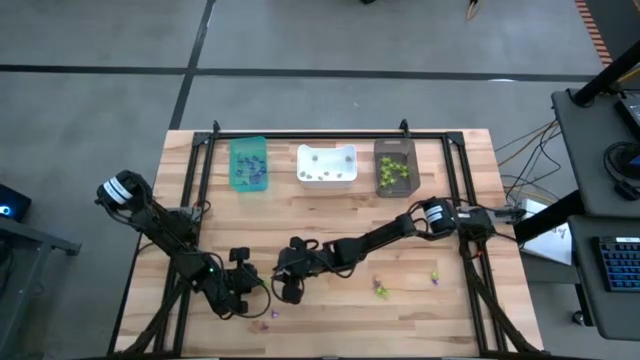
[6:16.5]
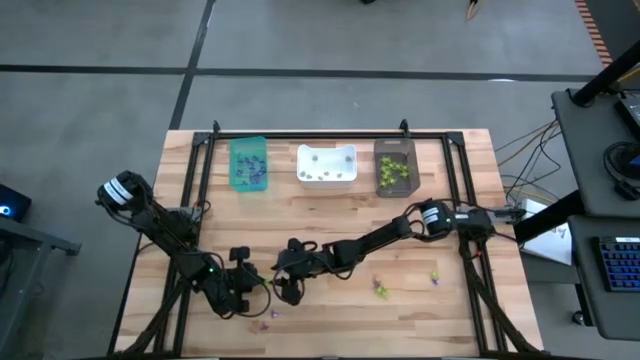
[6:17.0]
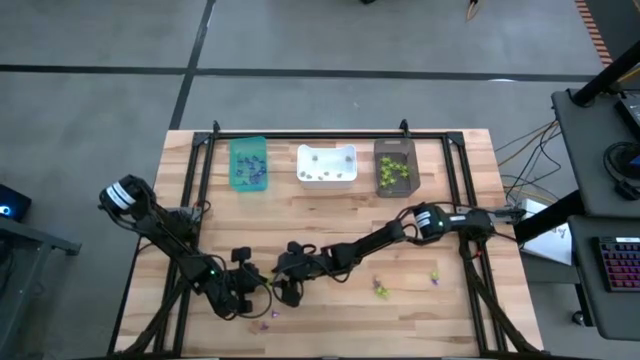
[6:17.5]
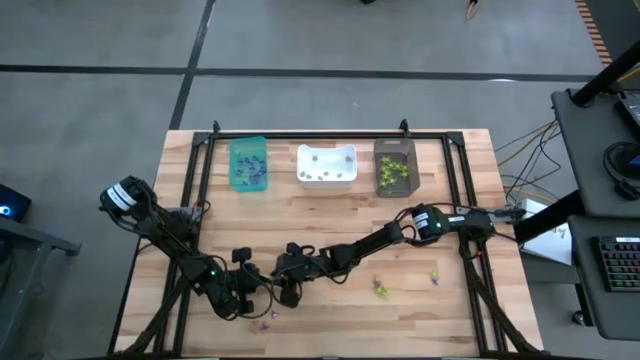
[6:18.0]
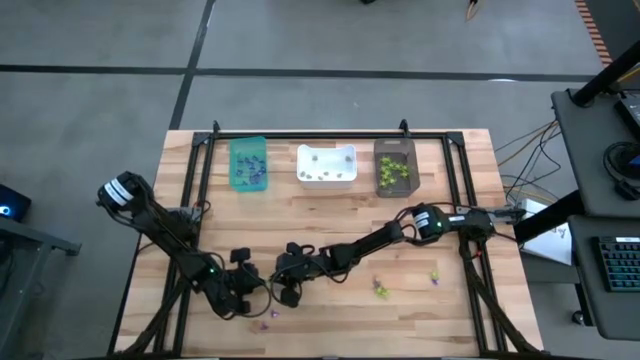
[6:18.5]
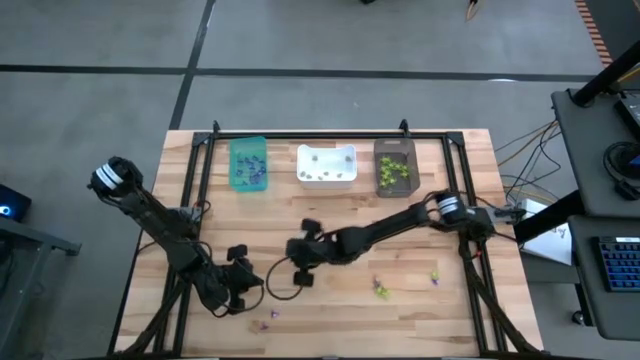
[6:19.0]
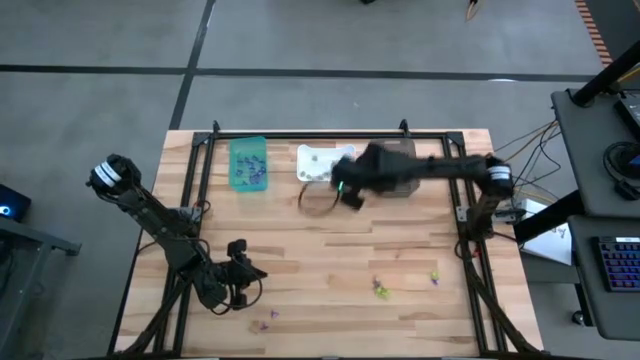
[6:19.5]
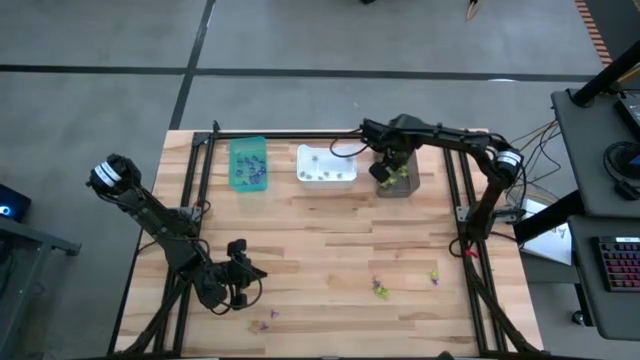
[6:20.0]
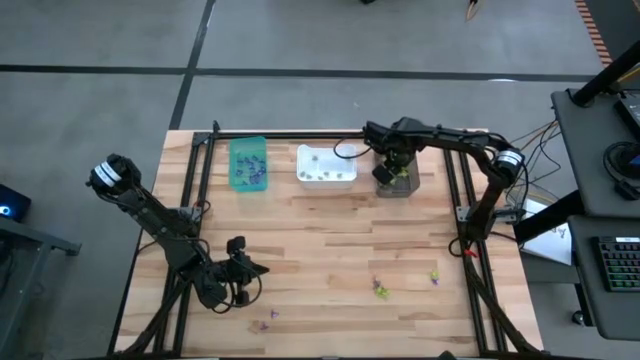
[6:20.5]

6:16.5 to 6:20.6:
Task: Sort Halloween decoration
Put the green spider toy into the black bin

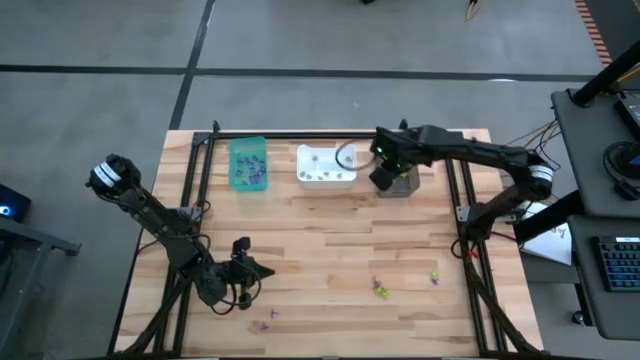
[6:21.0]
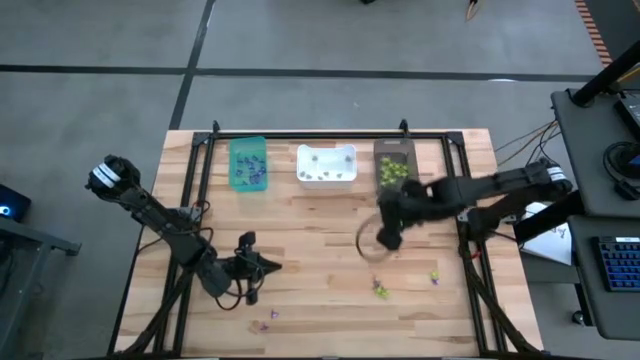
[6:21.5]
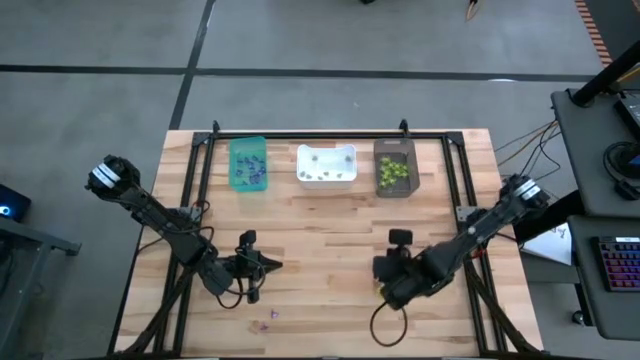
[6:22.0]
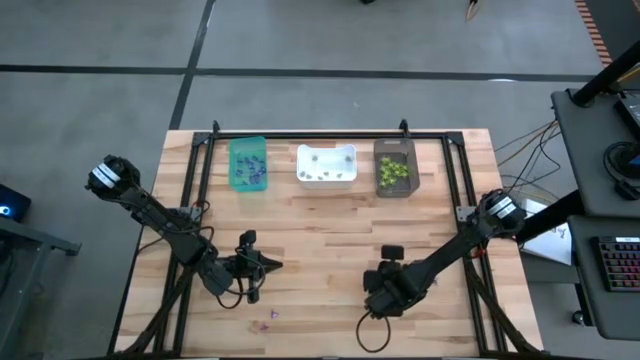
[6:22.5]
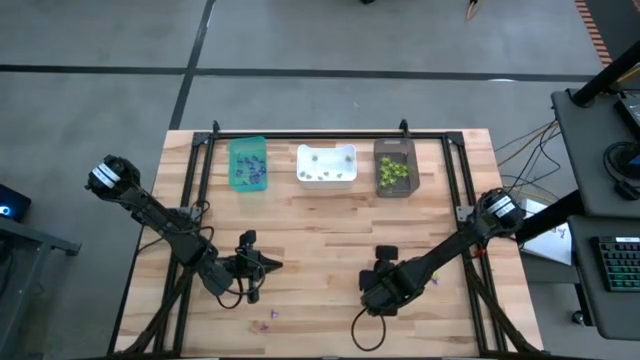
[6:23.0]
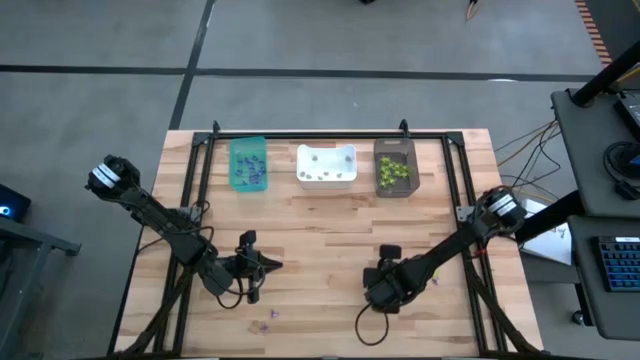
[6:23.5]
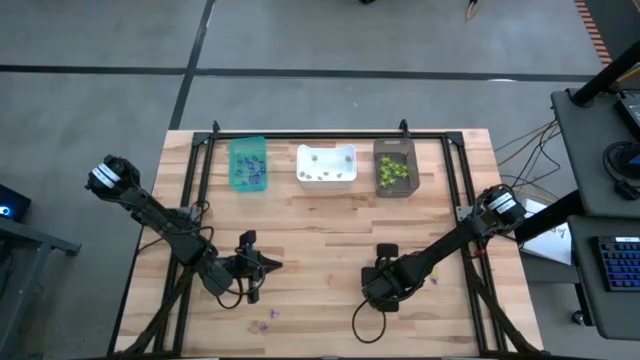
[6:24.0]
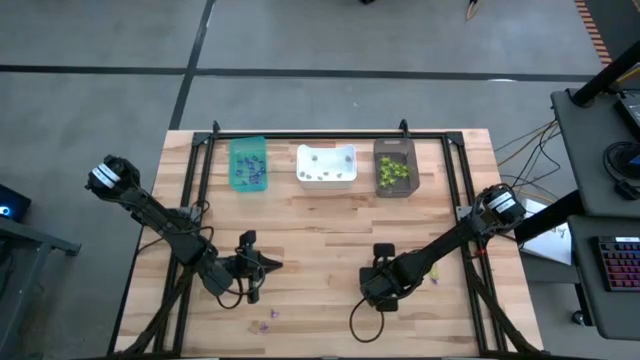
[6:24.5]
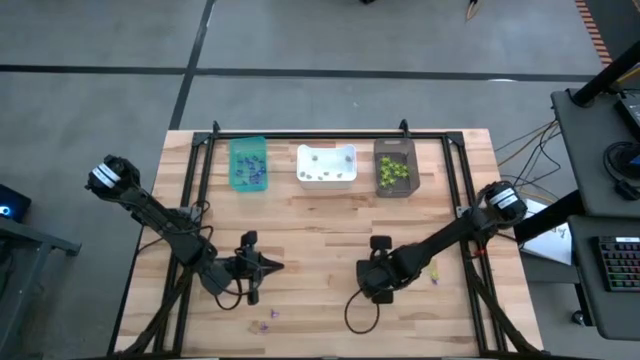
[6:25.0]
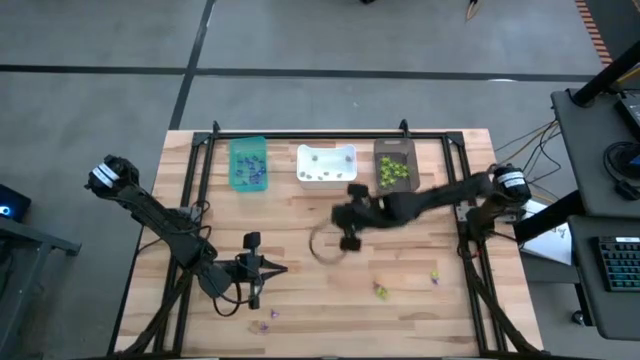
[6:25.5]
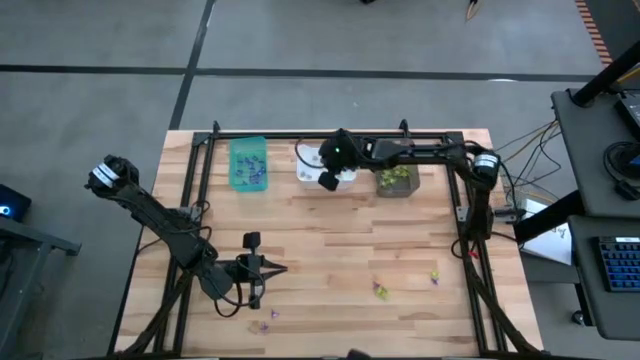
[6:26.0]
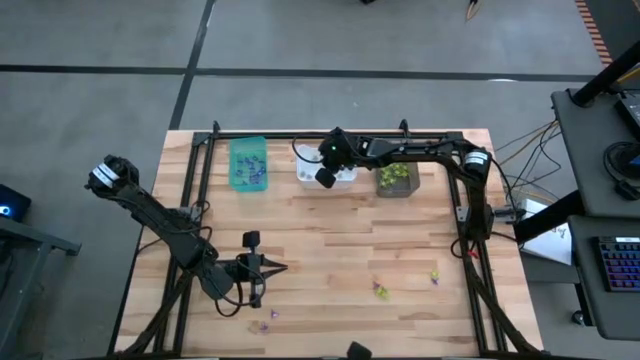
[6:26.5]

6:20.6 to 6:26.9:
Put the white skull toy into the white bin

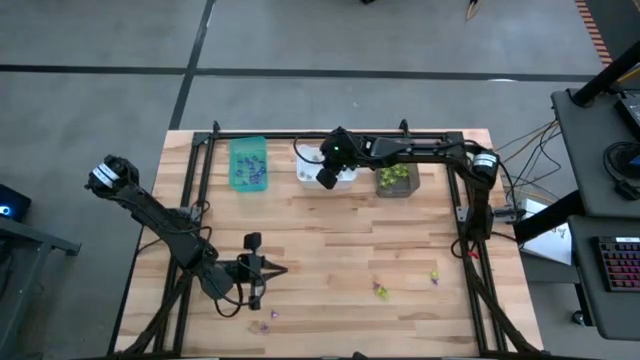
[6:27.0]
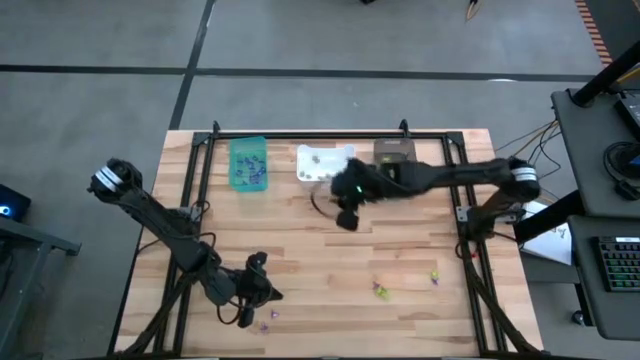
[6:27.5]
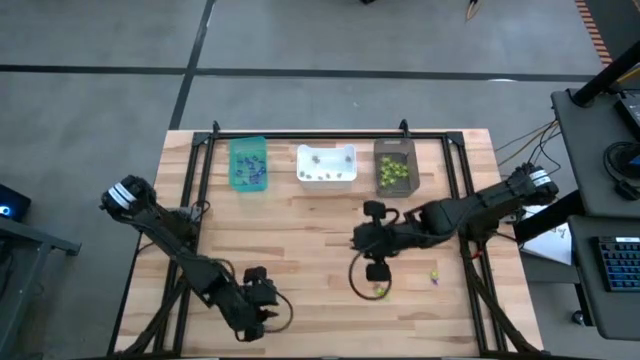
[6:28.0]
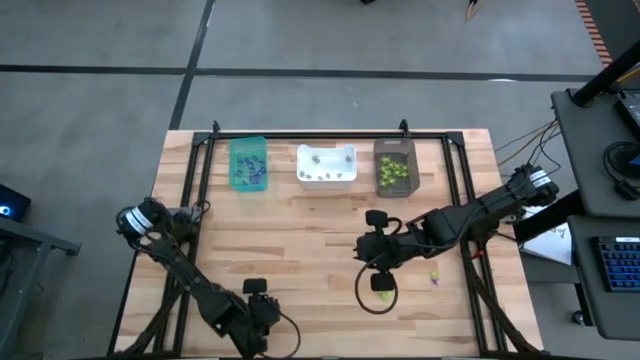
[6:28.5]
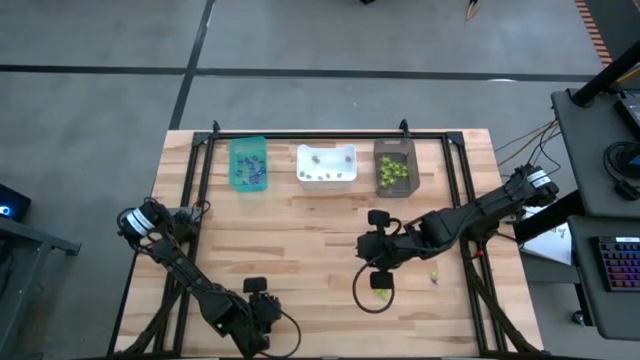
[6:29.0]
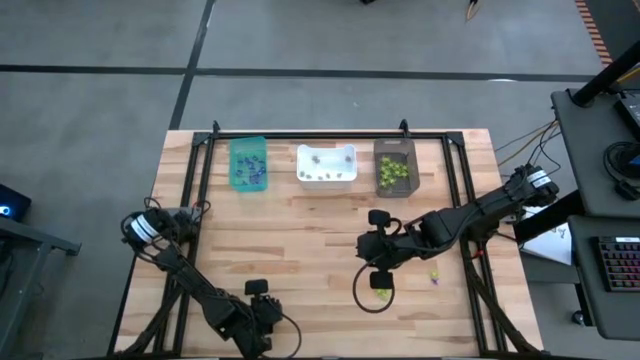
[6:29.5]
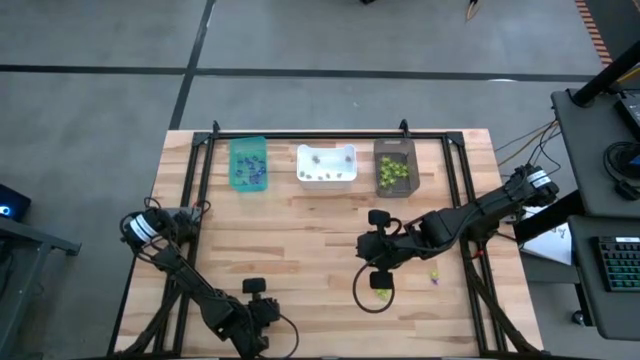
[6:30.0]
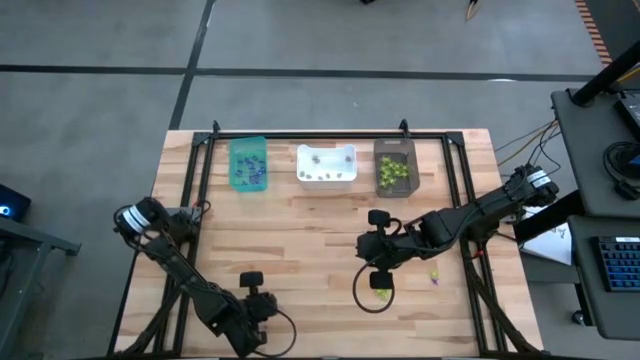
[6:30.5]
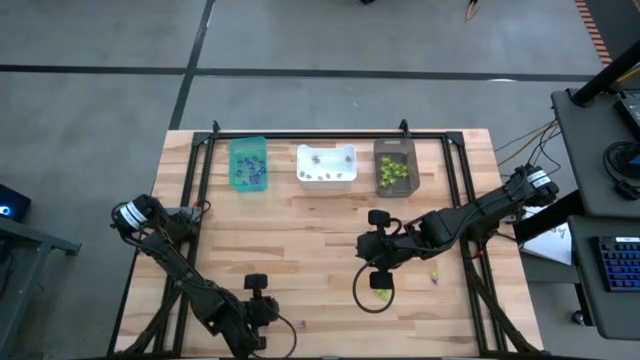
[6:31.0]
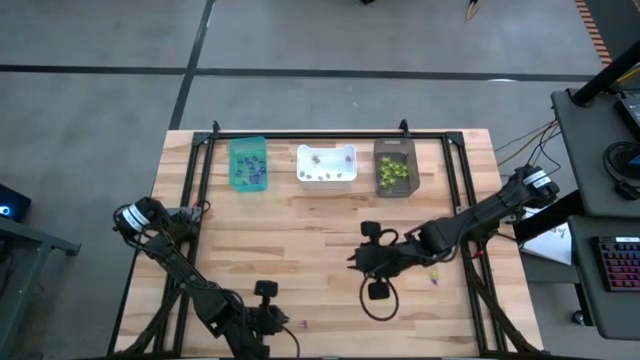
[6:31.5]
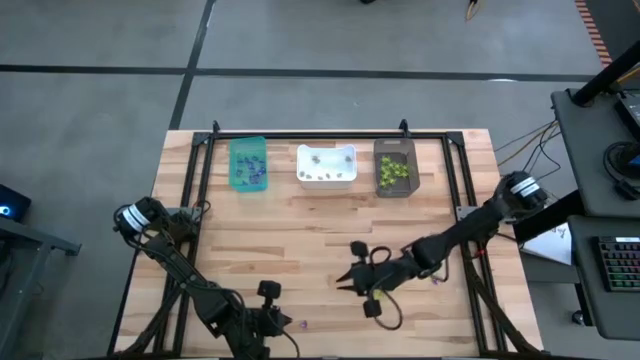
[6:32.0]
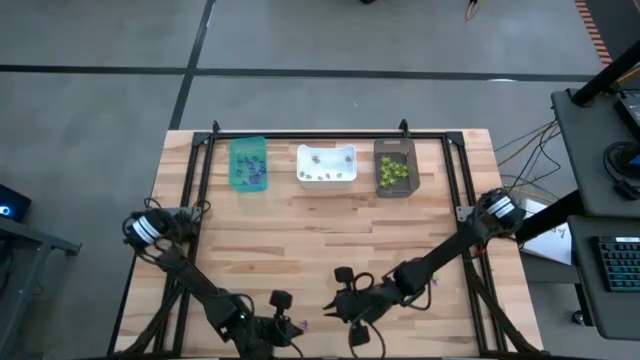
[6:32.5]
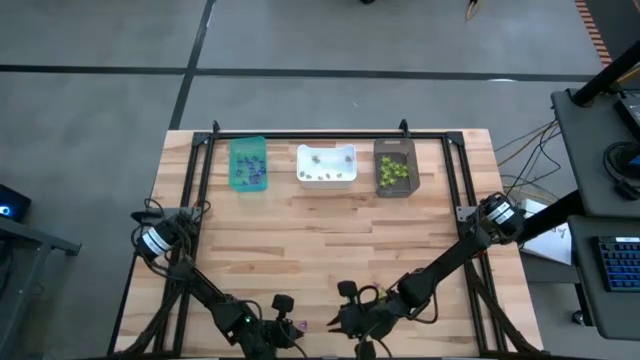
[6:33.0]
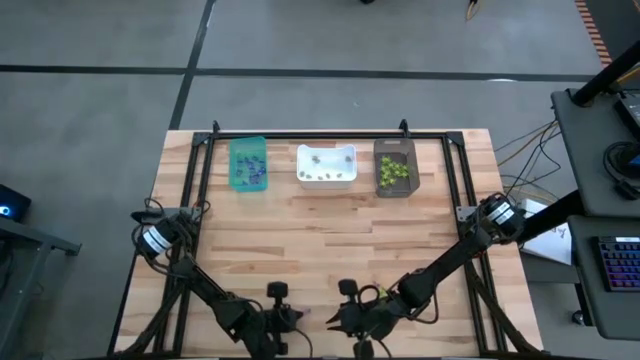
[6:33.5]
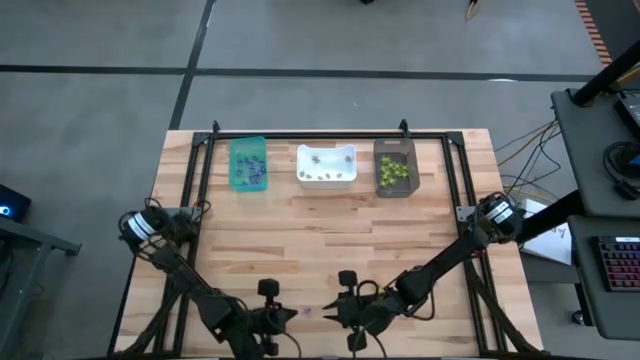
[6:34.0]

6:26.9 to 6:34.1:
Put the purple witch hat toy into the light blue bin

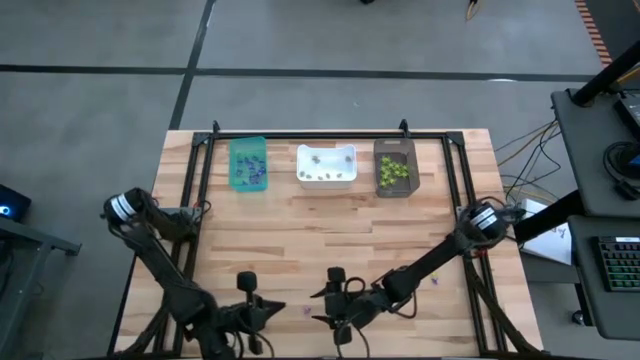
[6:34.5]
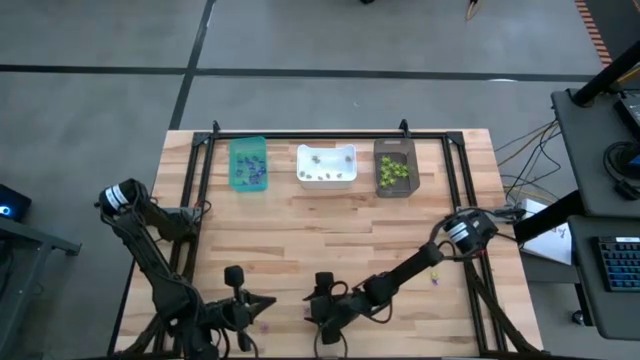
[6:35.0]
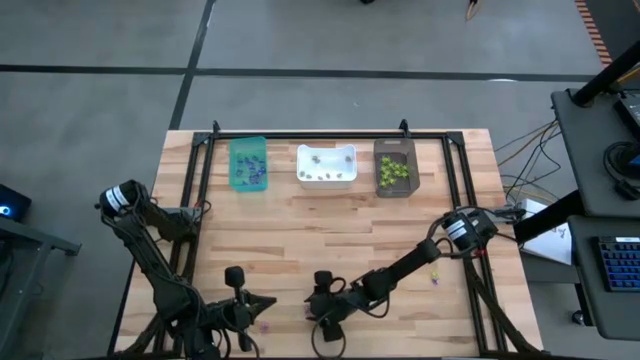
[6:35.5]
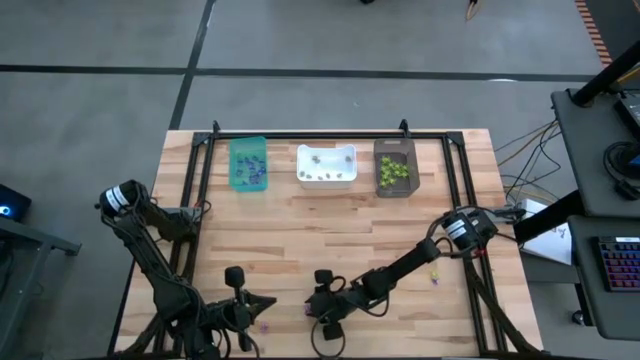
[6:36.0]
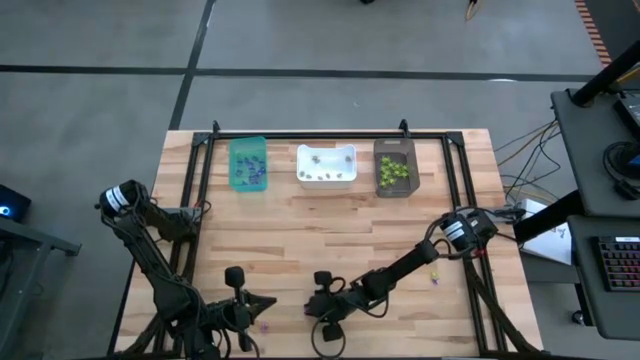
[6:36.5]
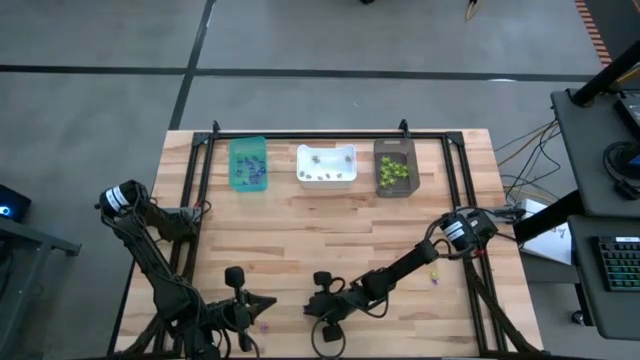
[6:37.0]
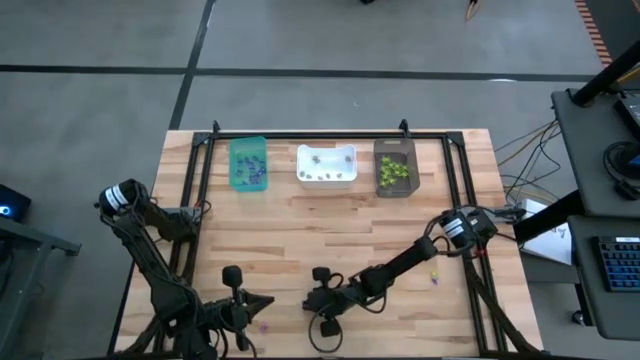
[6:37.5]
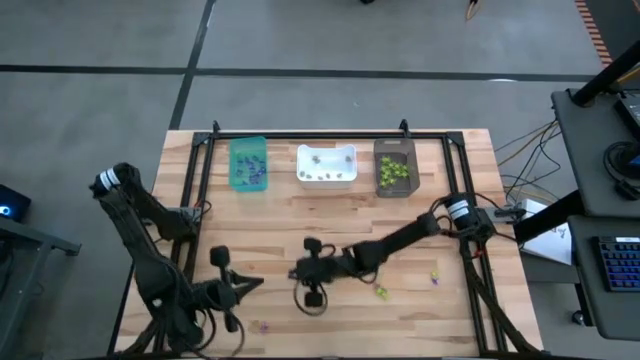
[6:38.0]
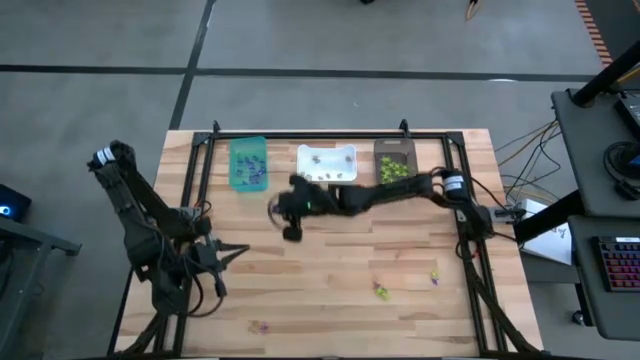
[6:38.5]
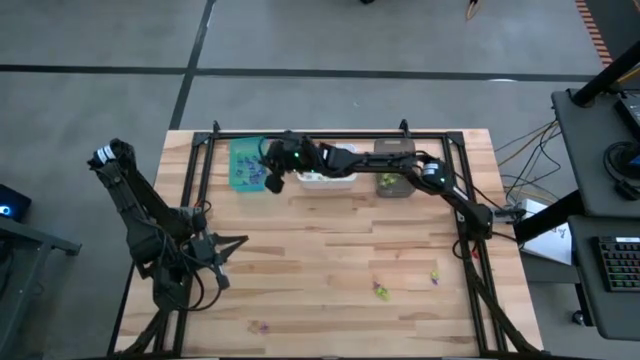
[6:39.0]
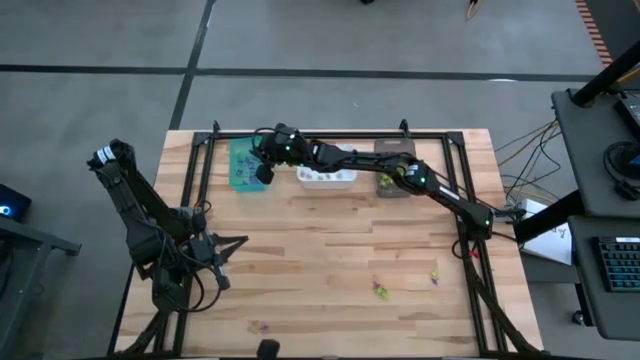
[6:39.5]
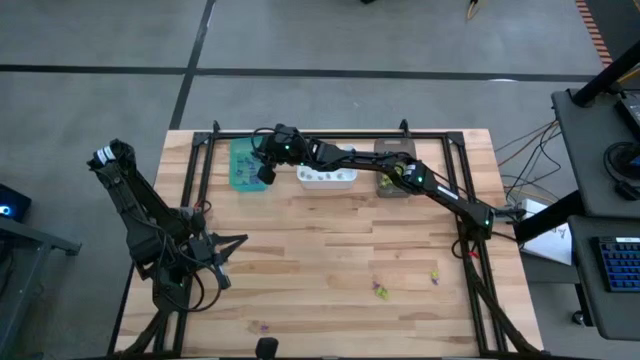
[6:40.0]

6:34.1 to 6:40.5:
Put the purple witch hat toy into the light blue bin
